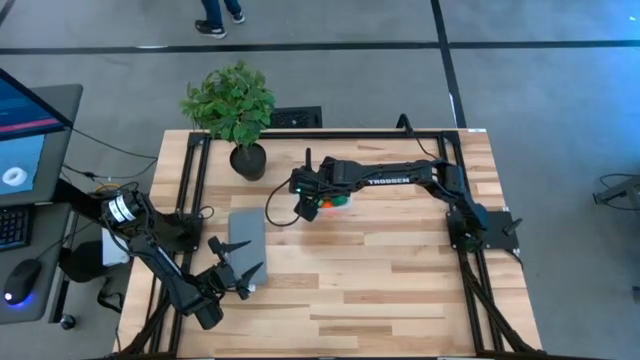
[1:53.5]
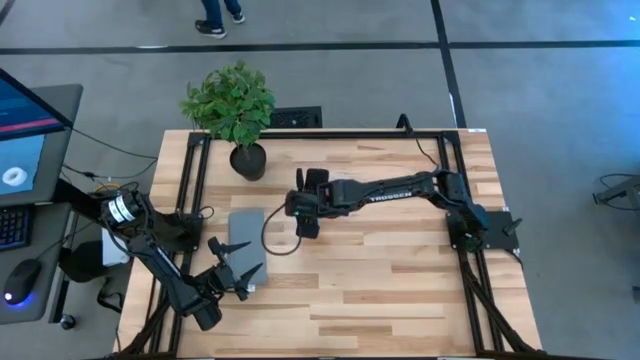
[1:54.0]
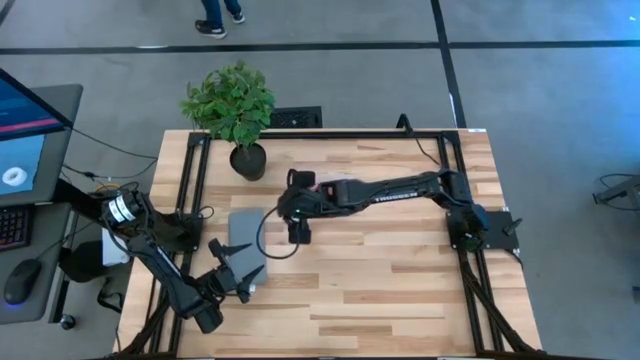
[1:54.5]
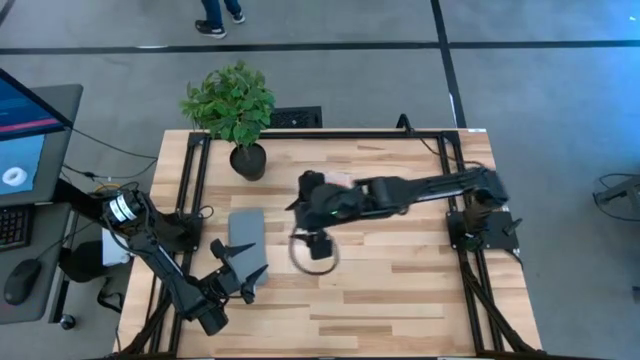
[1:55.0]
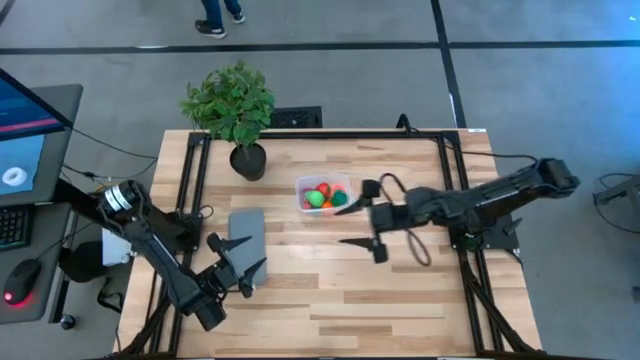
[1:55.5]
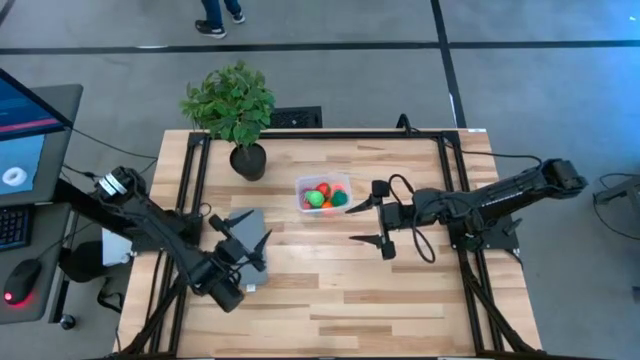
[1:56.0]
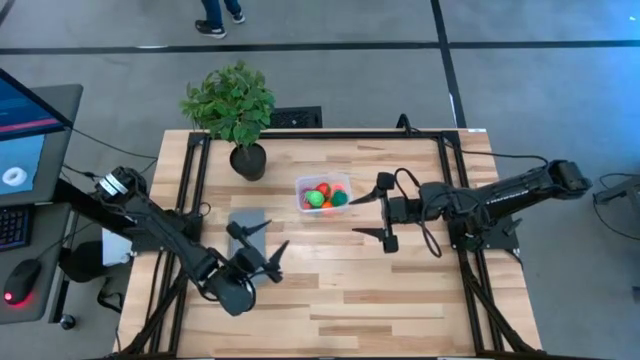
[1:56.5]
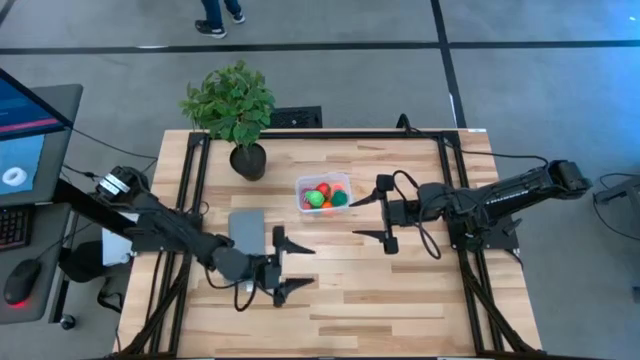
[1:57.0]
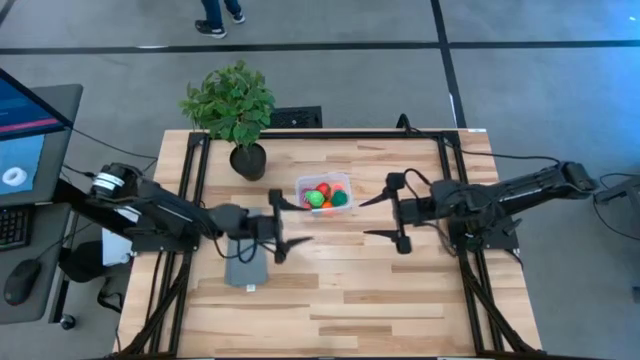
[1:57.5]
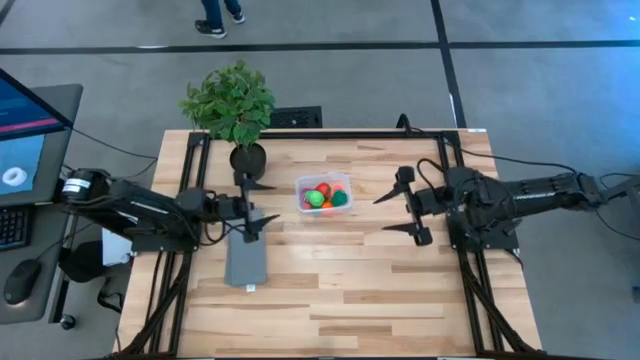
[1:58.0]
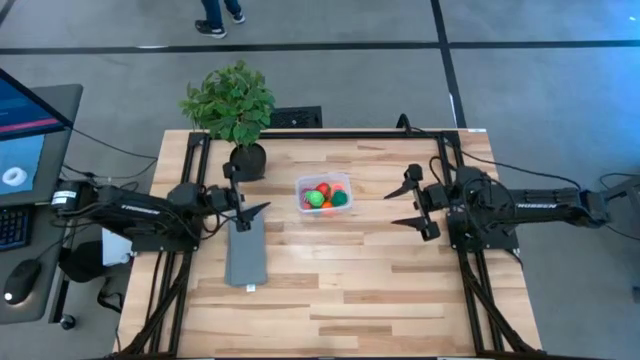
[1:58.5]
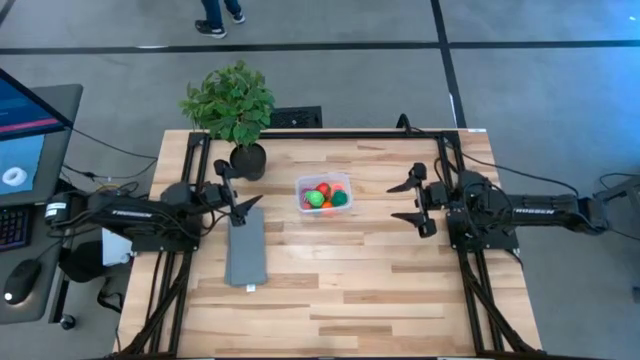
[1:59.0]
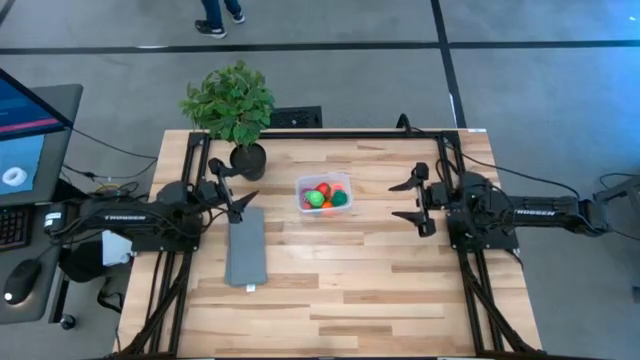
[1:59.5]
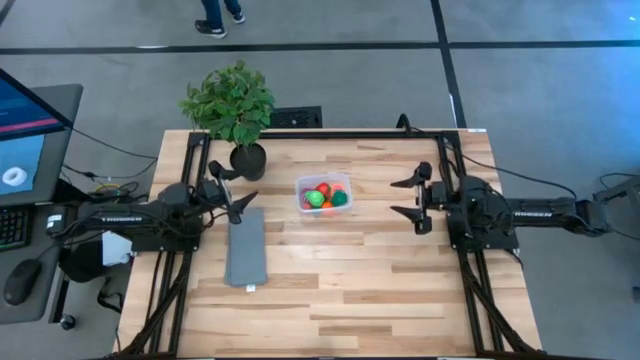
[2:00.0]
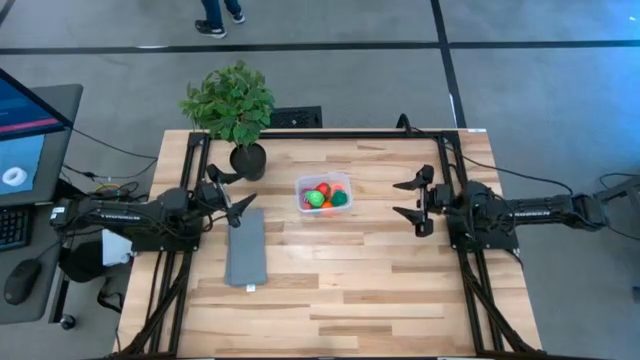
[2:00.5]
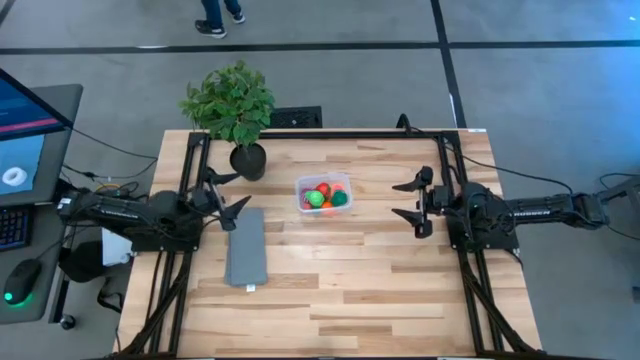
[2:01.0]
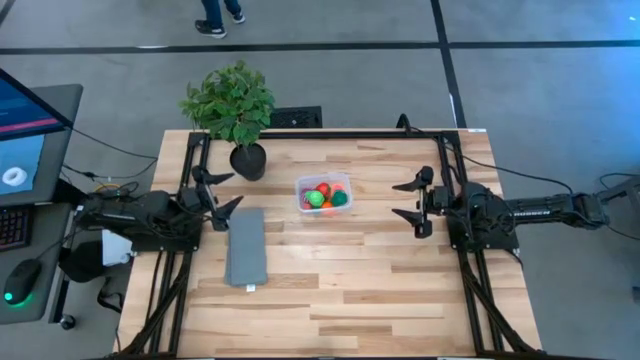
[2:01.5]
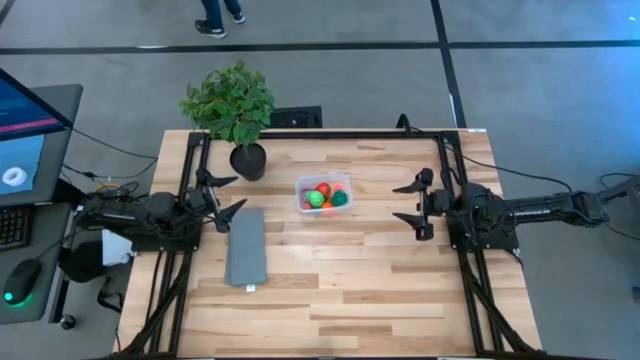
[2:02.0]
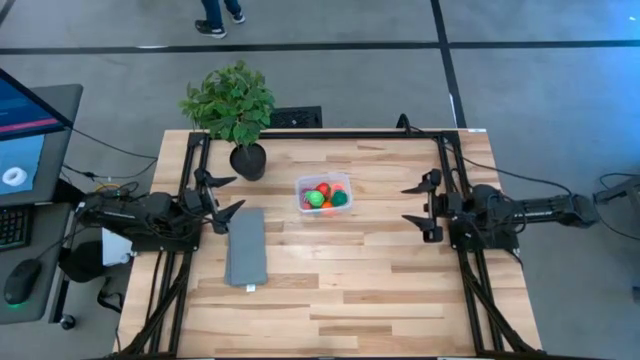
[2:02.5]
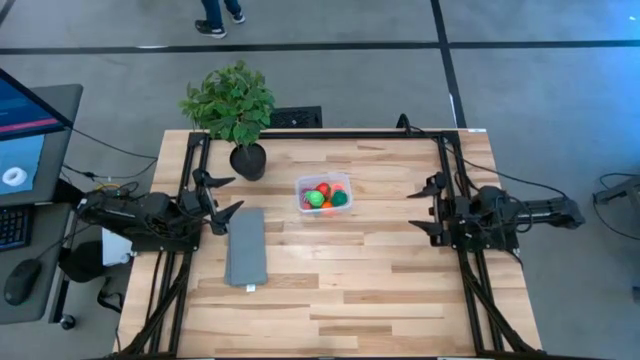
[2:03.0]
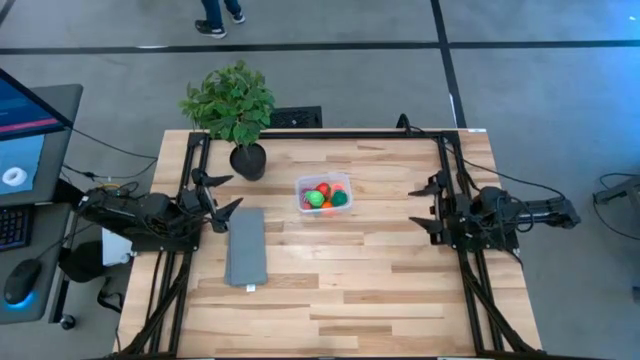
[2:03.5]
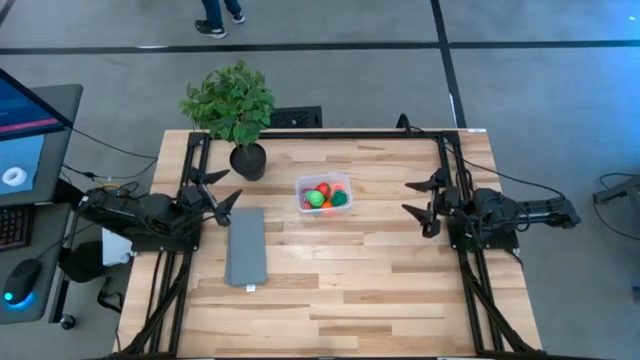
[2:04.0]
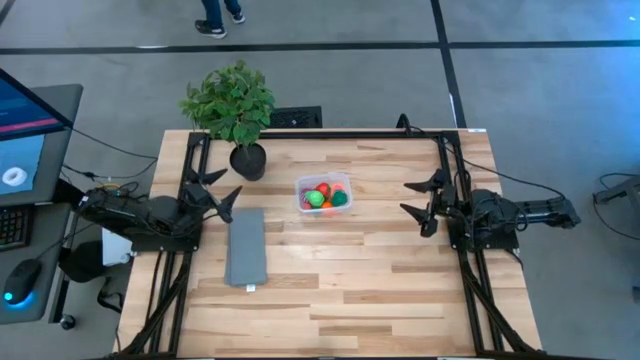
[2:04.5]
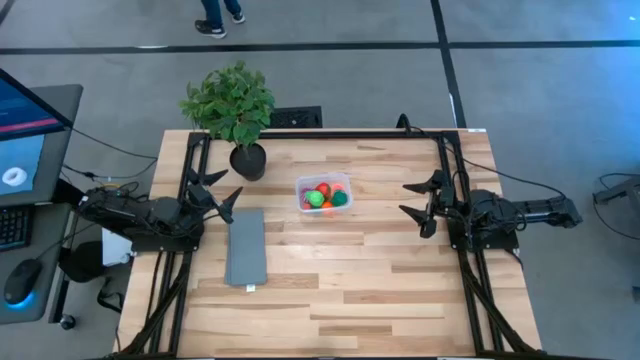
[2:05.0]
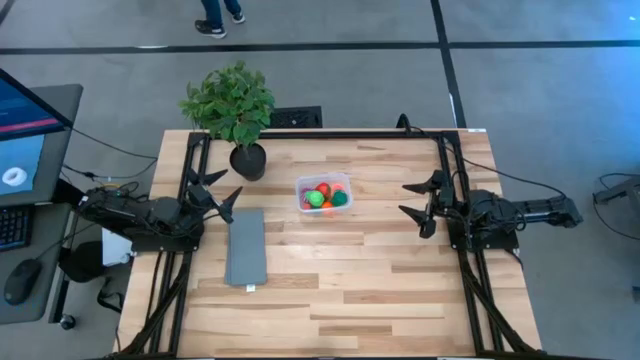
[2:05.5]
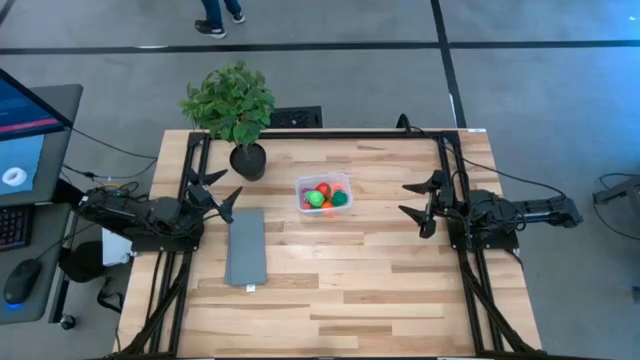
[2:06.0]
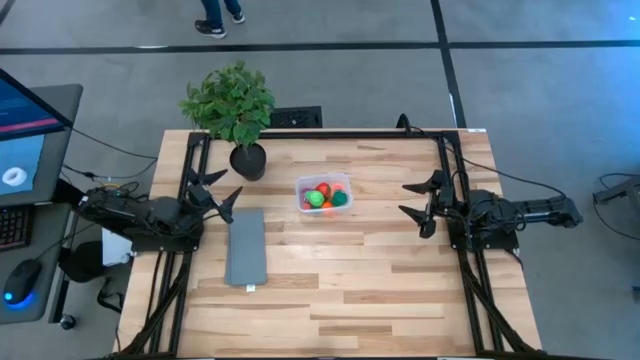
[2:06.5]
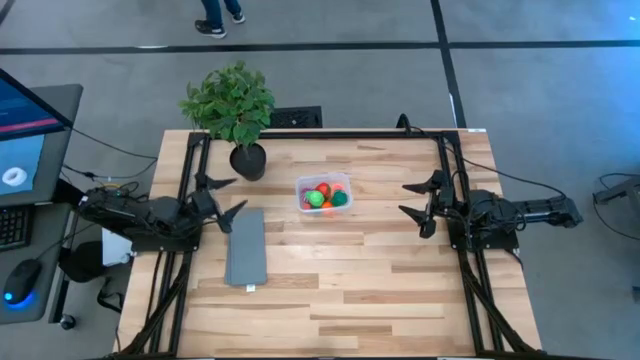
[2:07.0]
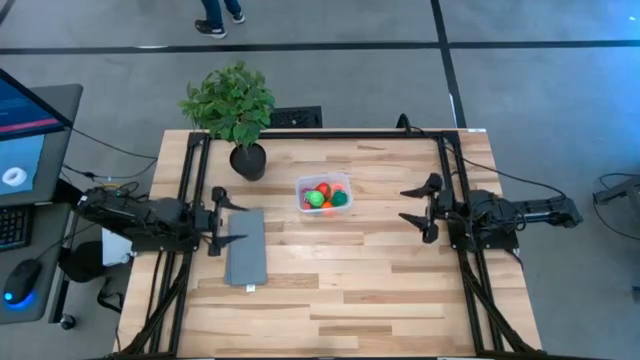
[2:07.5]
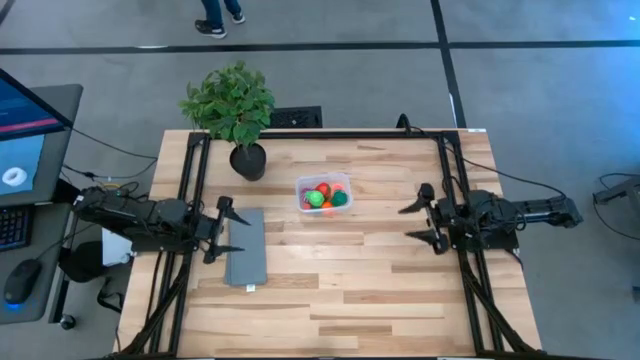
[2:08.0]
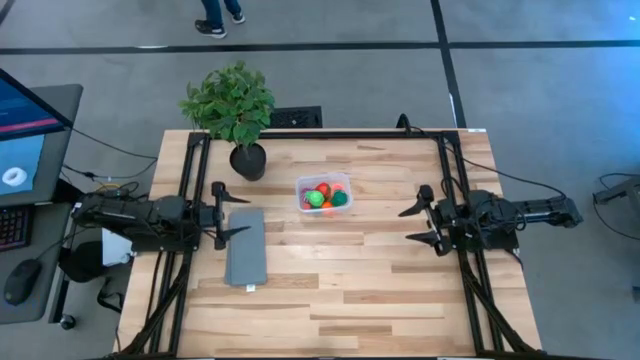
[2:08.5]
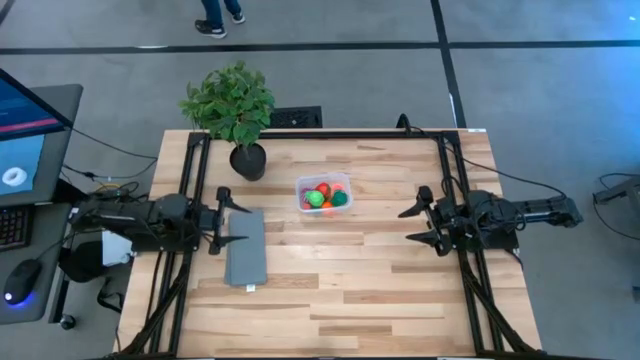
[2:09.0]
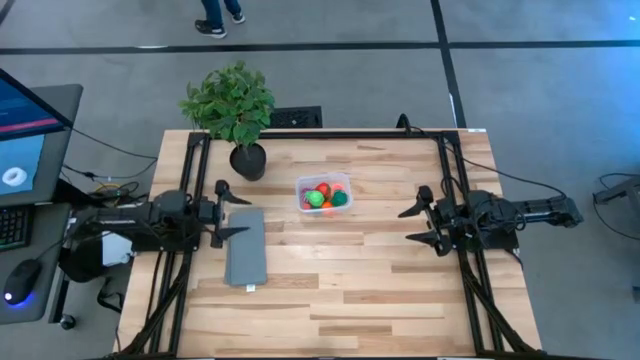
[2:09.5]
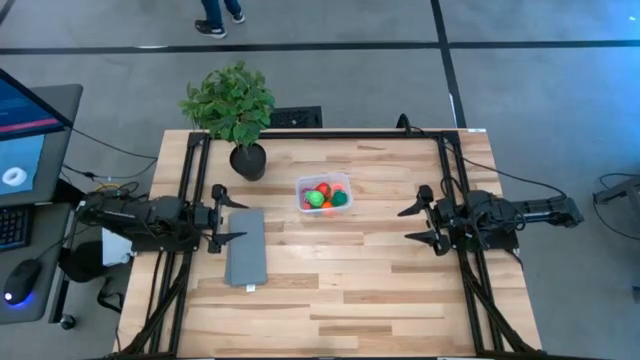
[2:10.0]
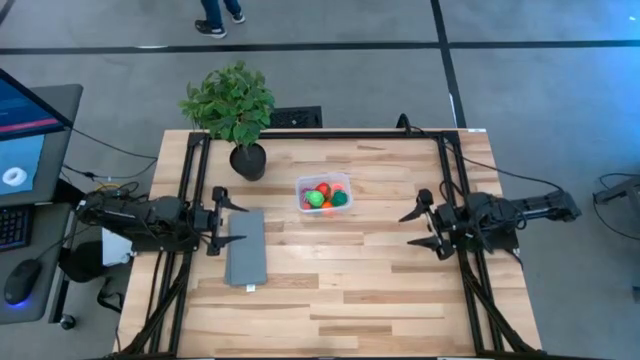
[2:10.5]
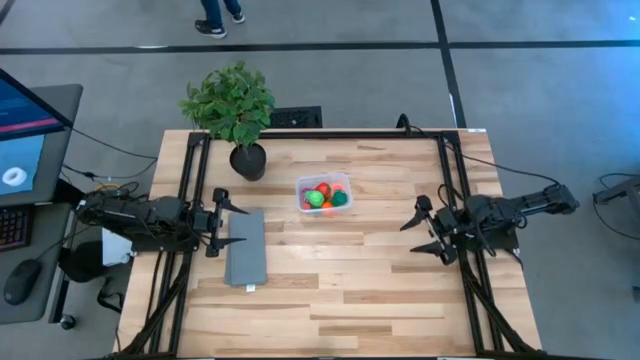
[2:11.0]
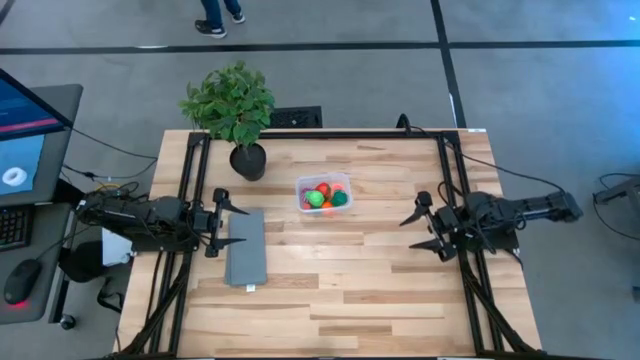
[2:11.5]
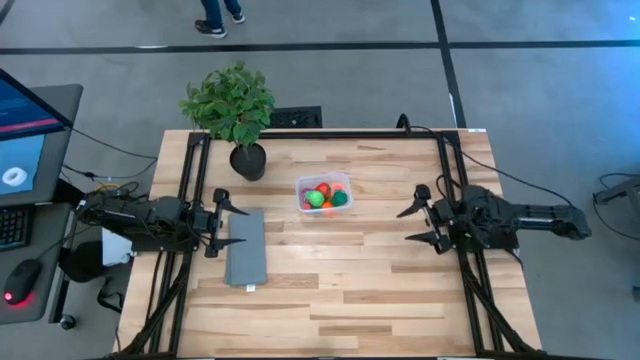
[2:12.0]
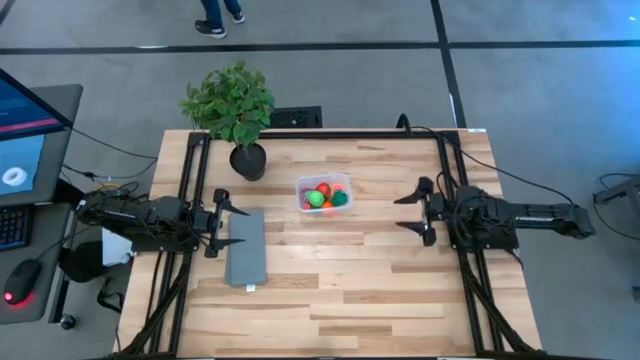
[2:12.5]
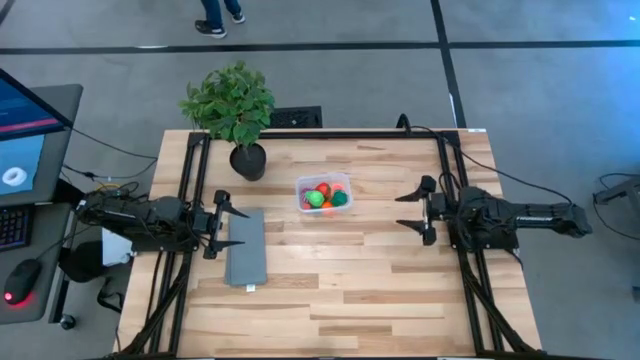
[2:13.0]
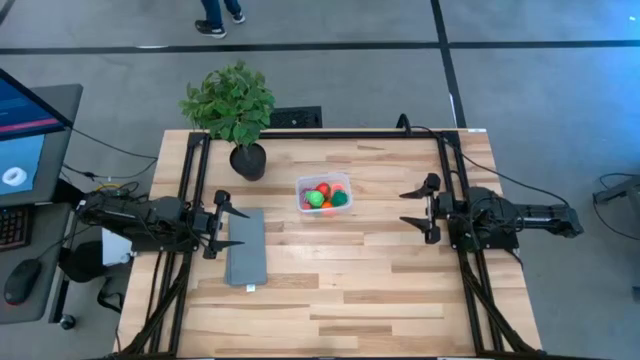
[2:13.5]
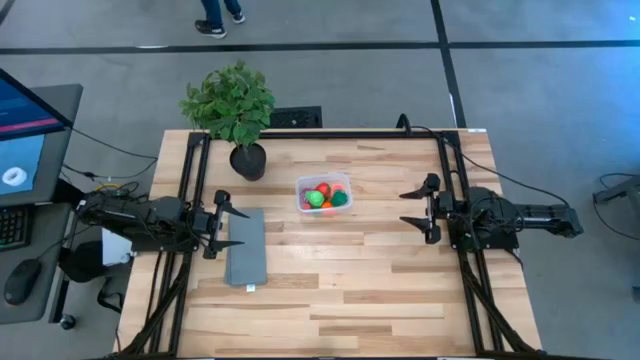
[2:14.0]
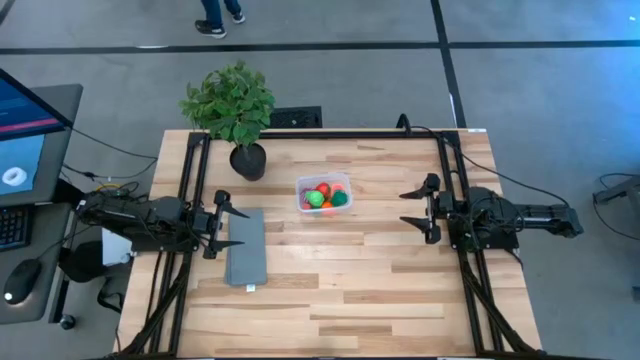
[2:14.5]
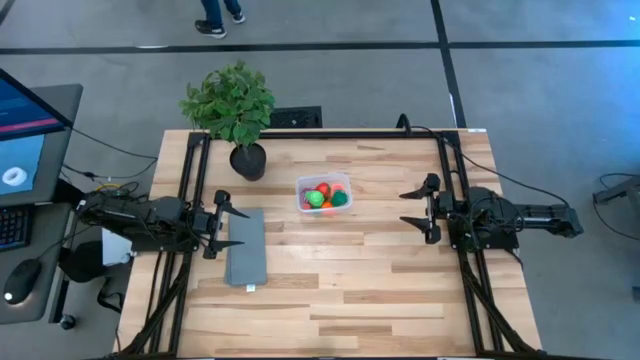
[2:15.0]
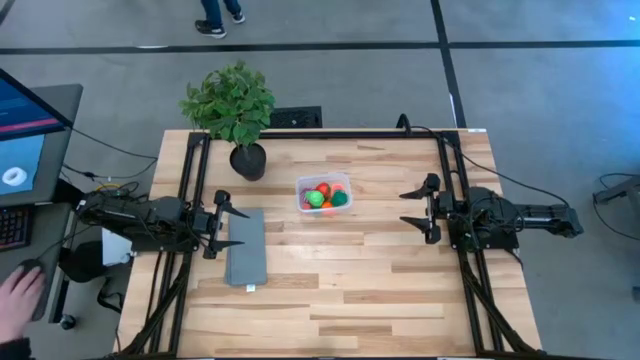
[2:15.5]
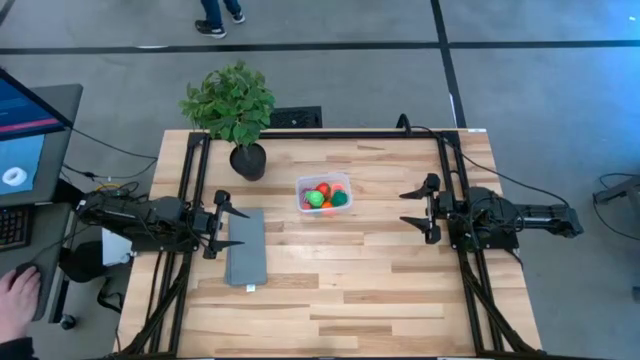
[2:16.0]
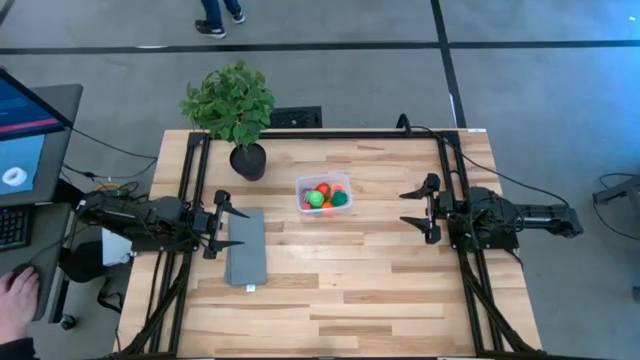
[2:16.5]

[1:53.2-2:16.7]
Task: Pick and placing Produce into tupperware
Return to Home Position
